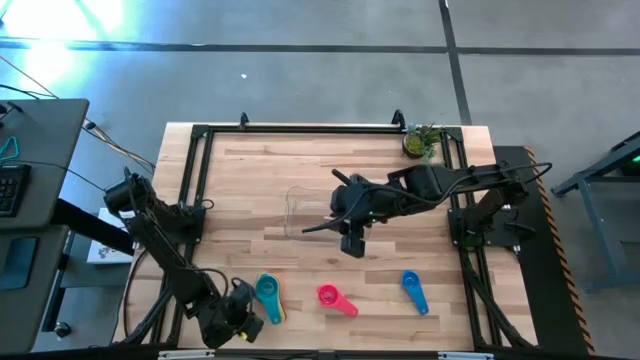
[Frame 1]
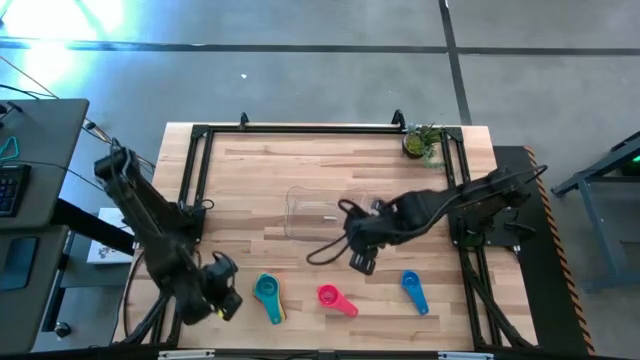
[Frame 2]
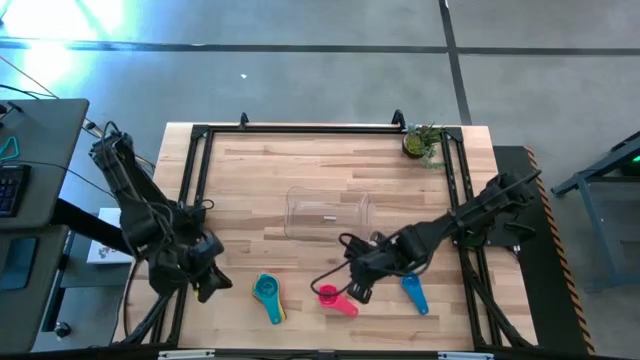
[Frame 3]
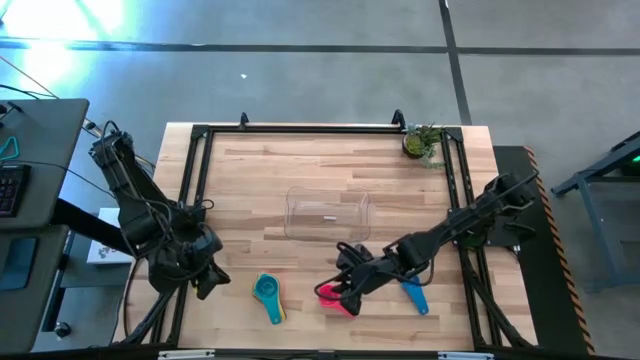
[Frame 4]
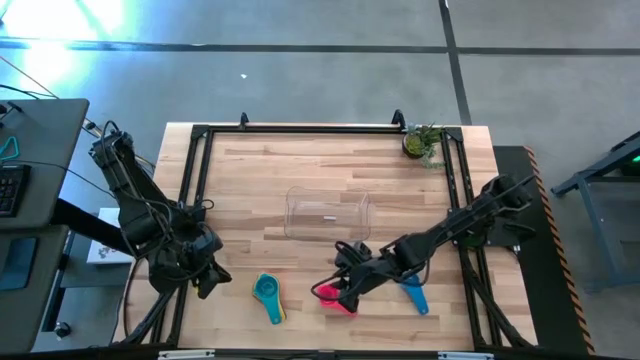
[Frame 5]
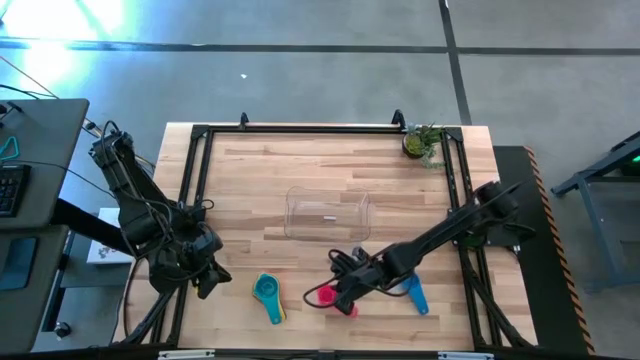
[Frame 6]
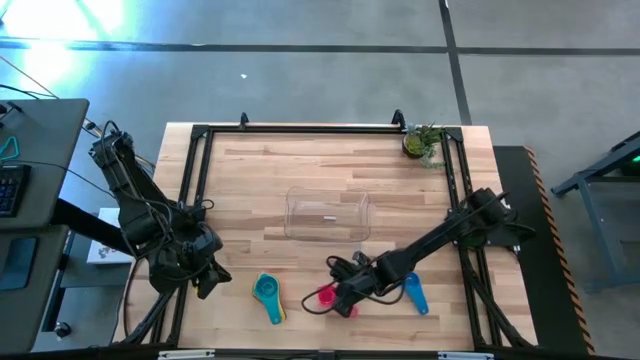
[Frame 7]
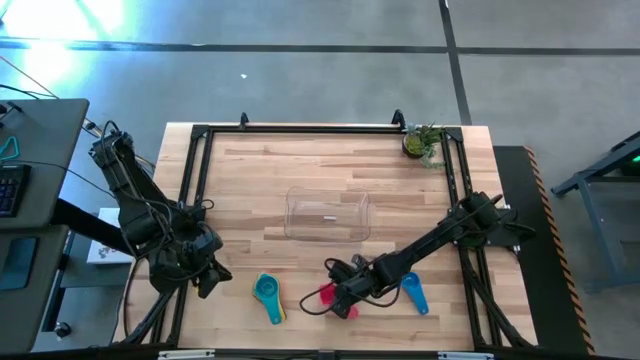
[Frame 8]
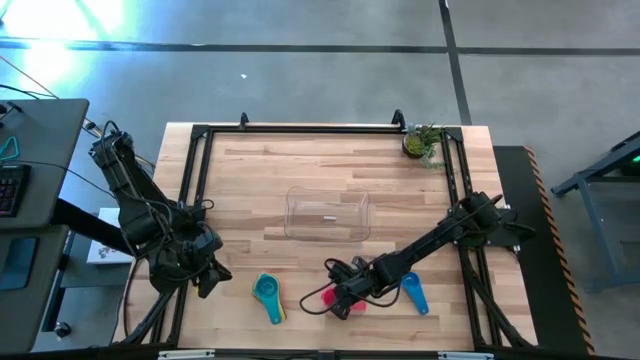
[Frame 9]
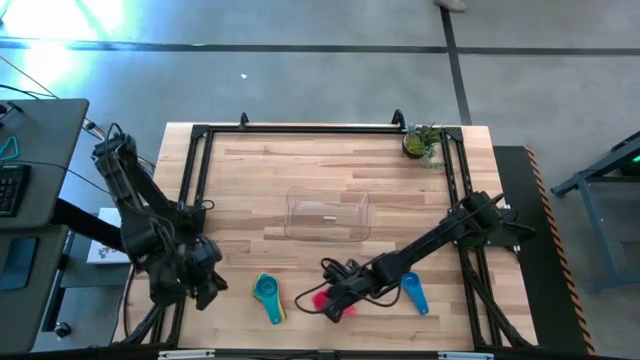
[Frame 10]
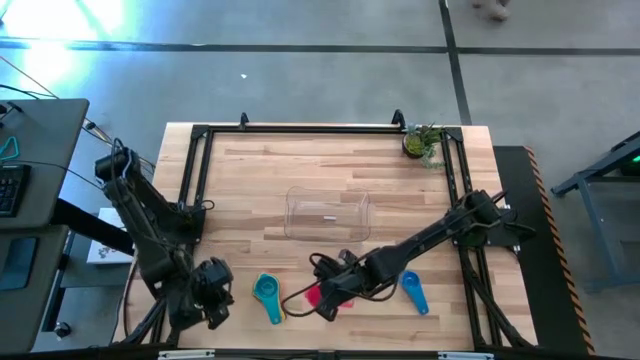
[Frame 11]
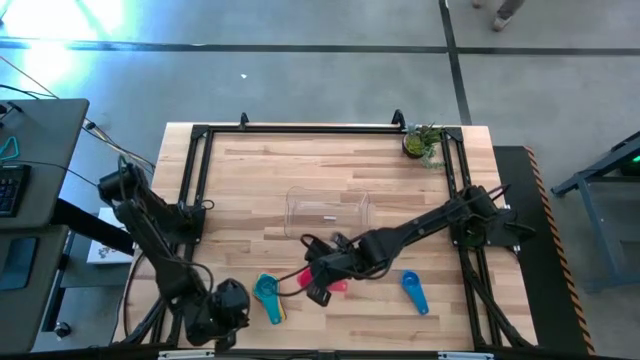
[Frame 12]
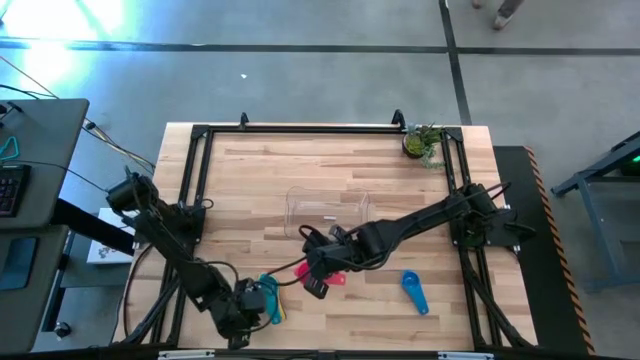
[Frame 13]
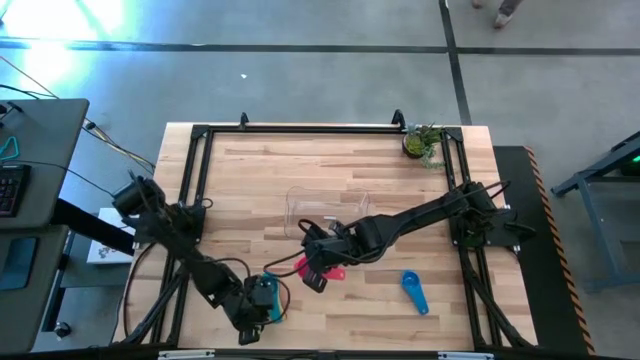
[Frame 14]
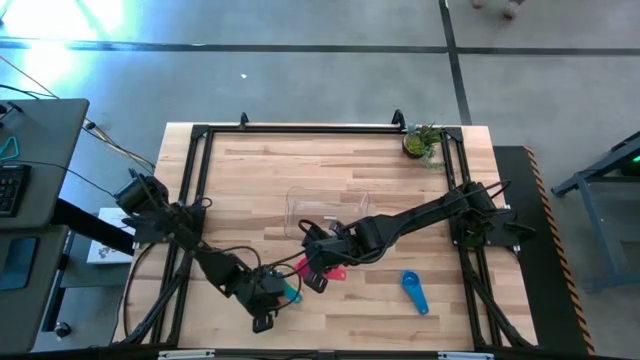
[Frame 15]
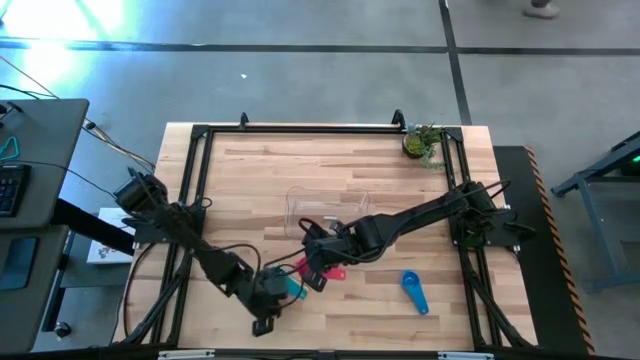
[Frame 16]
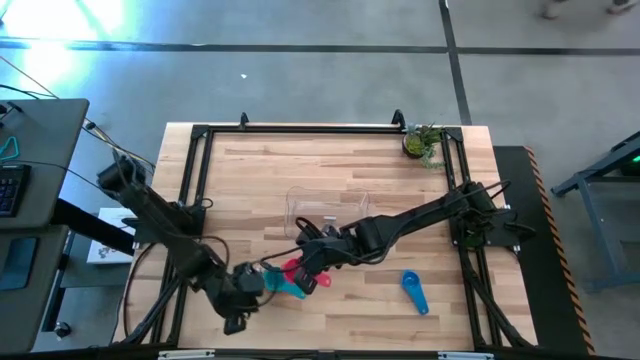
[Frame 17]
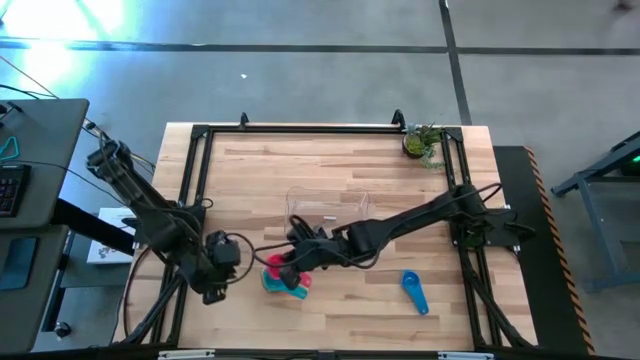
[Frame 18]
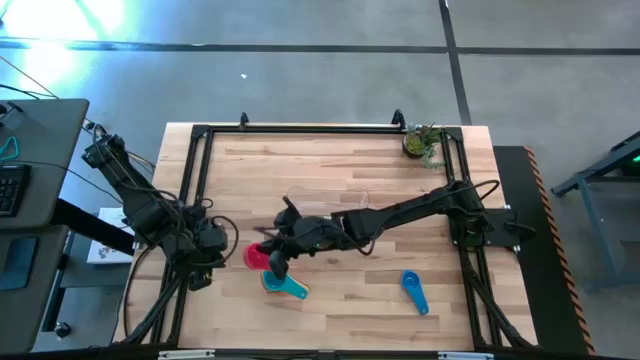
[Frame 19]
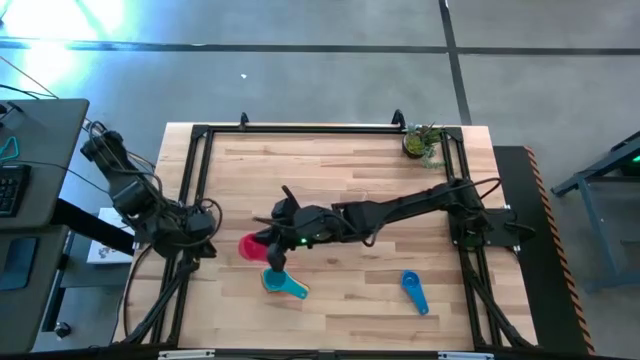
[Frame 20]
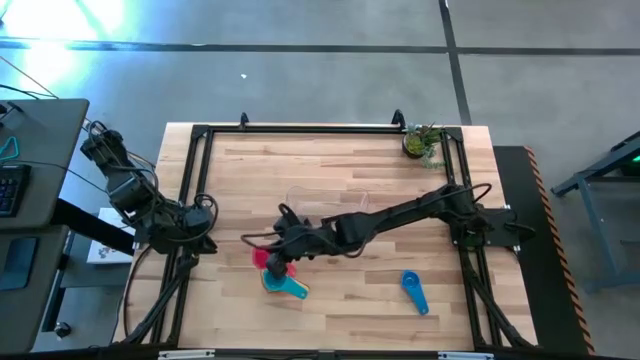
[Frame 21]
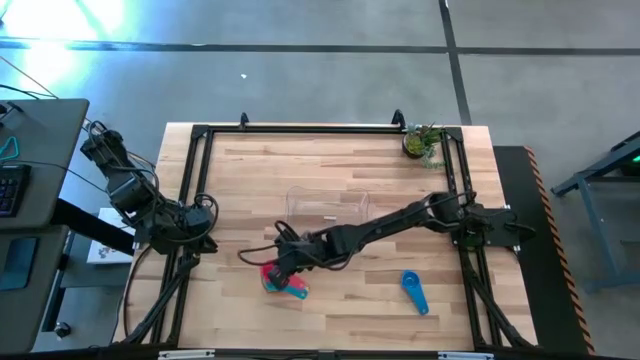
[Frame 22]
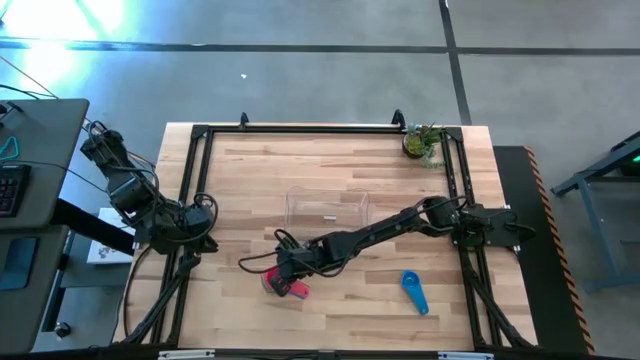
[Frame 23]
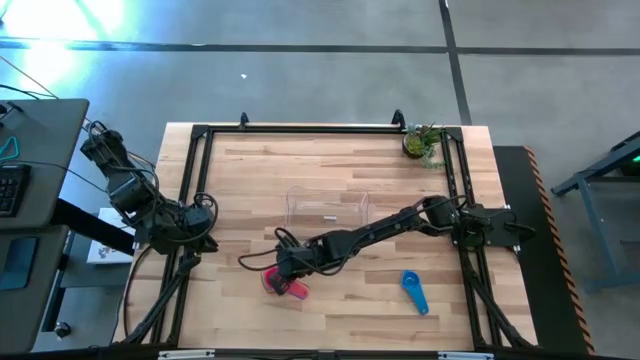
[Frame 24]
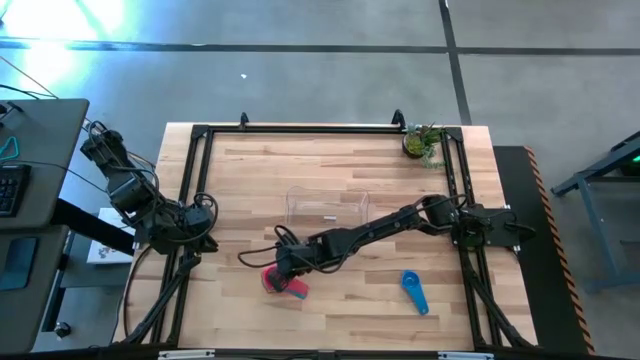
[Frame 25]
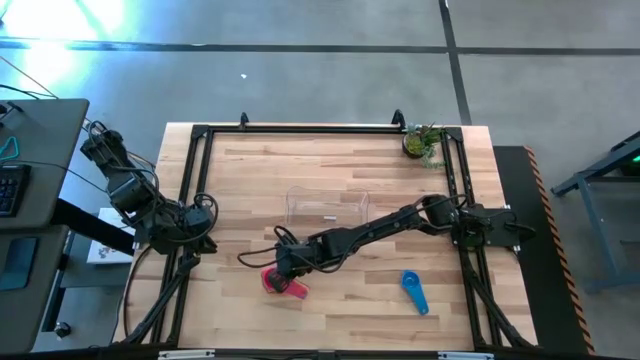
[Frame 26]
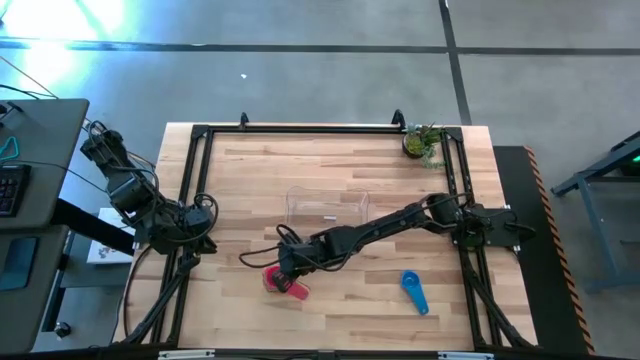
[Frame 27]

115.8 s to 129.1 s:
Task: Nest measuring cups in basket
Stack the red measuring cup on top of the light blue measuring cup

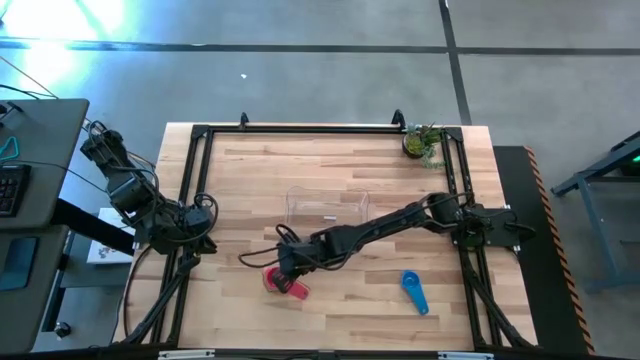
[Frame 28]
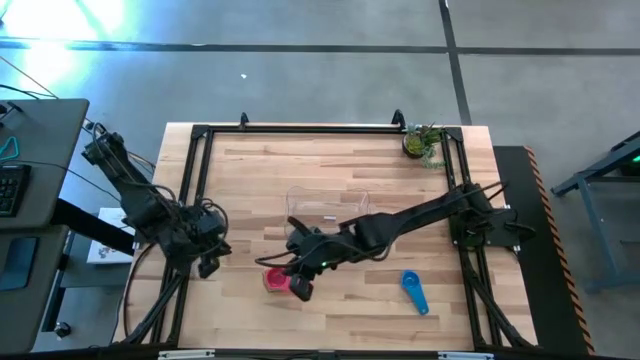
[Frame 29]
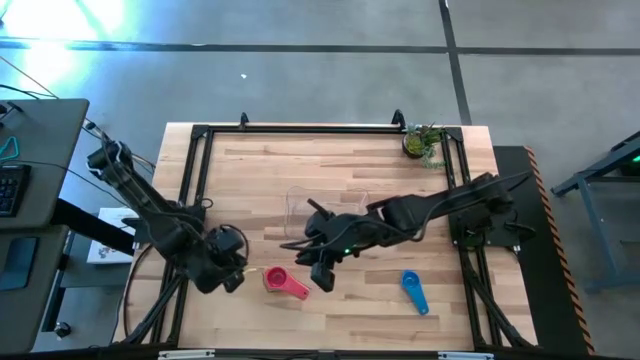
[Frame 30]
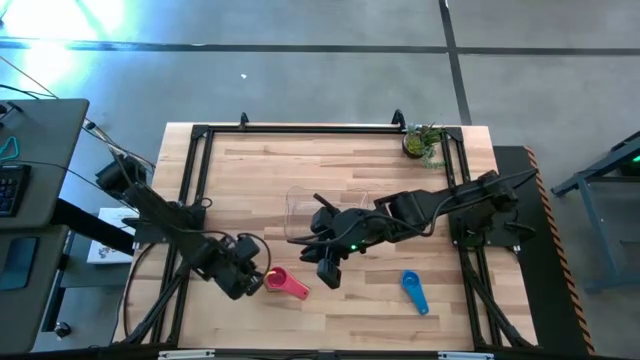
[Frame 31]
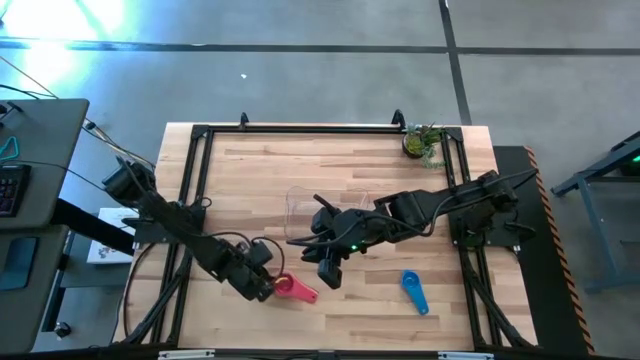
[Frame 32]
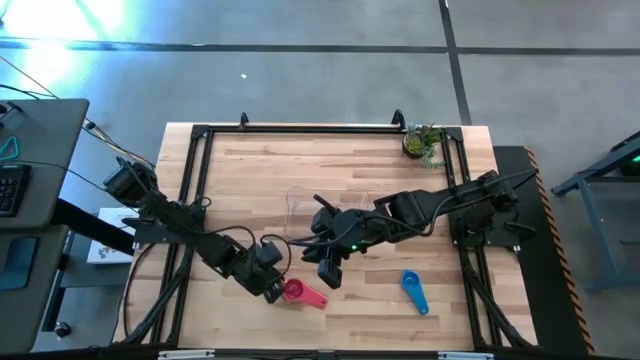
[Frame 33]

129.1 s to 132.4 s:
Adjust the stacked measuring cups on the table

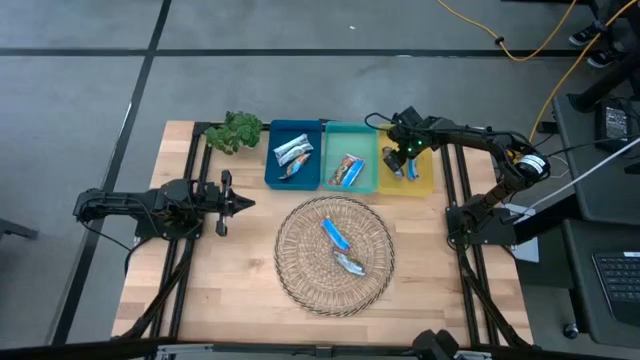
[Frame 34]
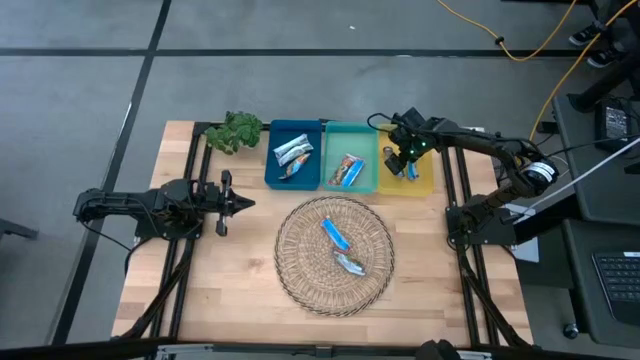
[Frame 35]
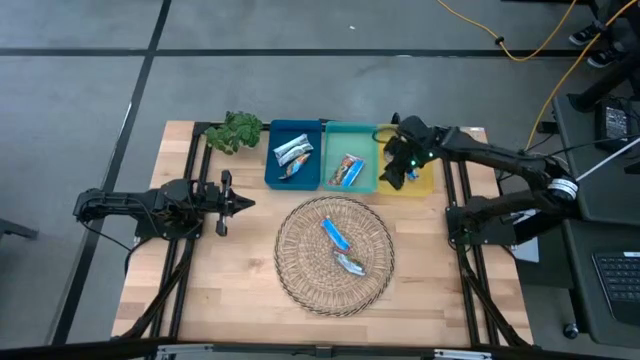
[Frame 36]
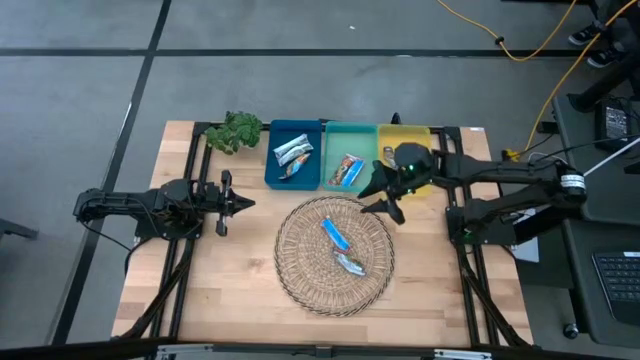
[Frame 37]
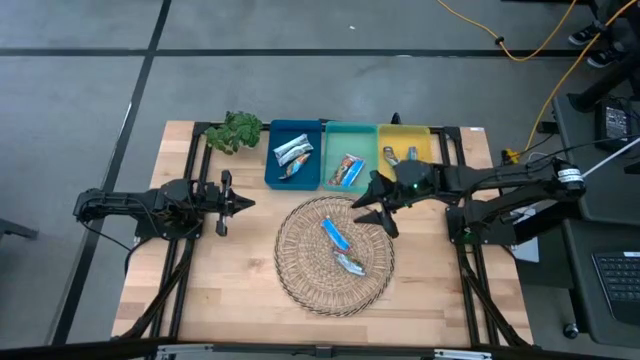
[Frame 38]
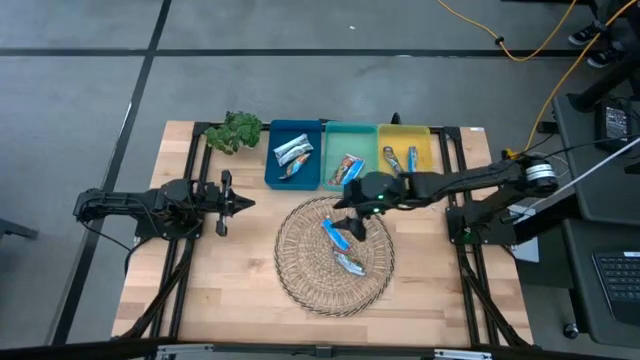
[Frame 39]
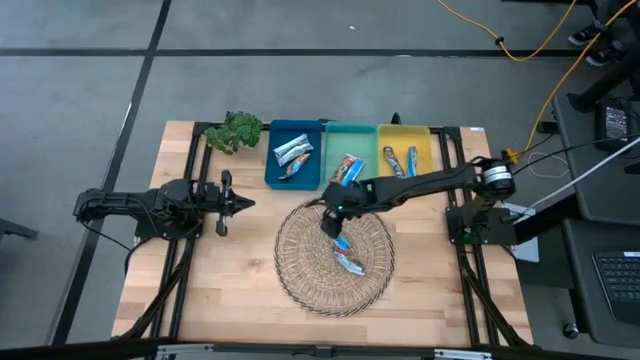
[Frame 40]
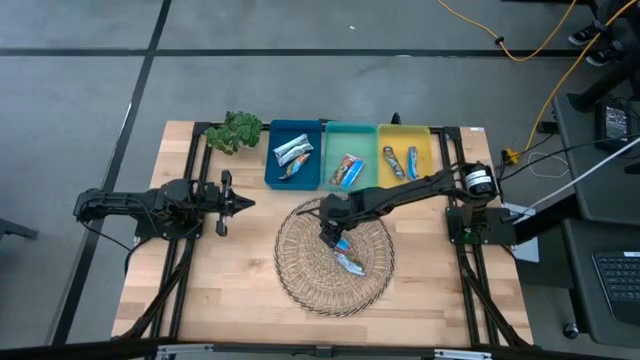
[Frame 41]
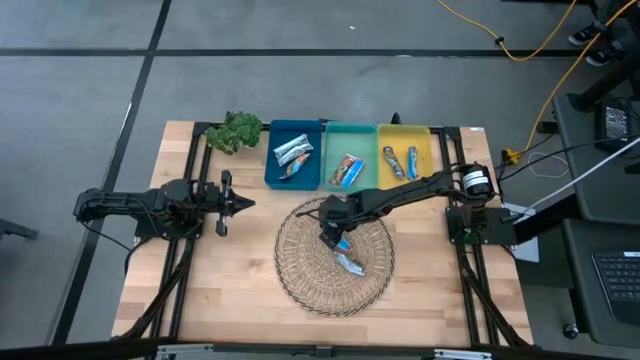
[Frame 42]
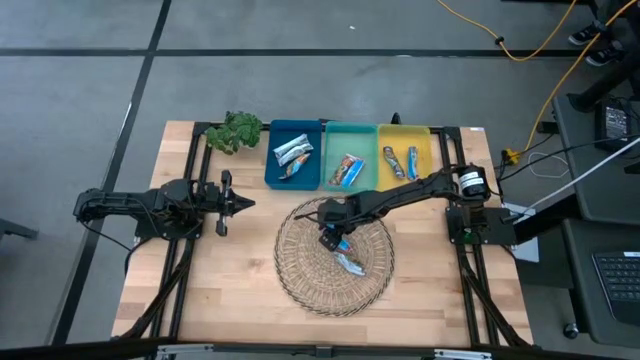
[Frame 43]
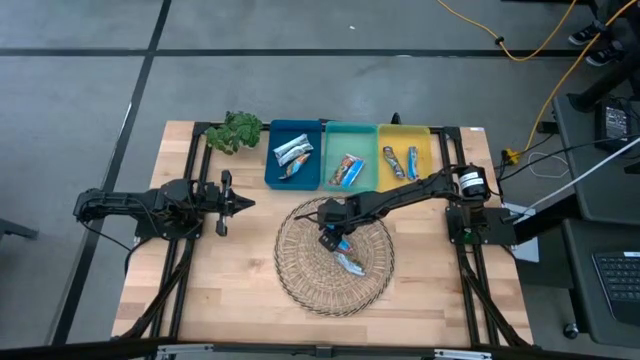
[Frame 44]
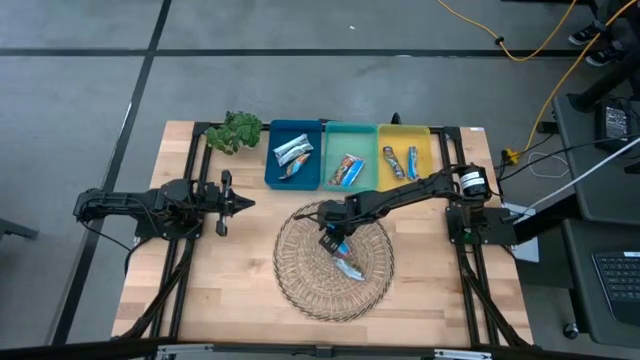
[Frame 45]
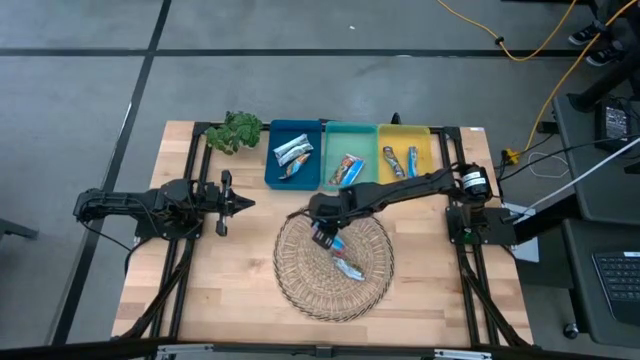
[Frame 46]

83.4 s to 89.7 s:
Task: Pick and place Granola Bars by type
Put the orange granola bar into the green bin
